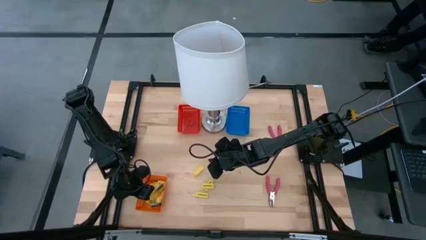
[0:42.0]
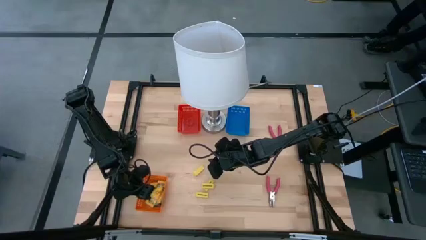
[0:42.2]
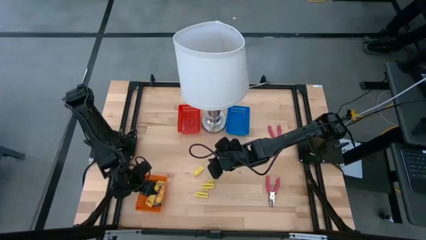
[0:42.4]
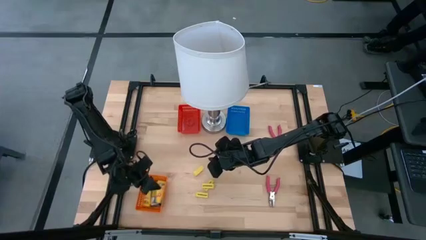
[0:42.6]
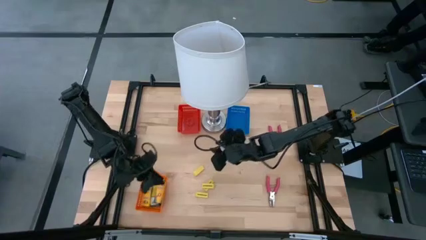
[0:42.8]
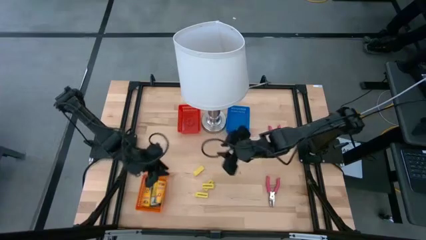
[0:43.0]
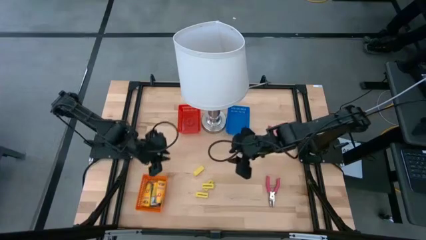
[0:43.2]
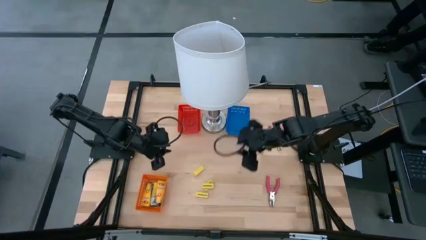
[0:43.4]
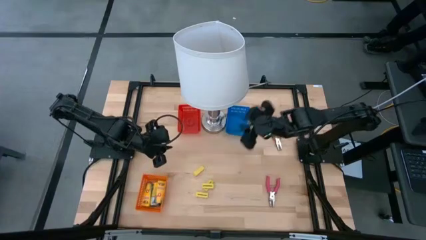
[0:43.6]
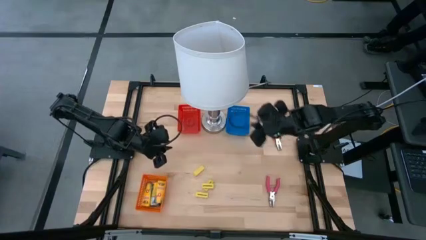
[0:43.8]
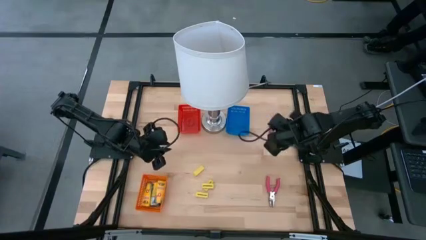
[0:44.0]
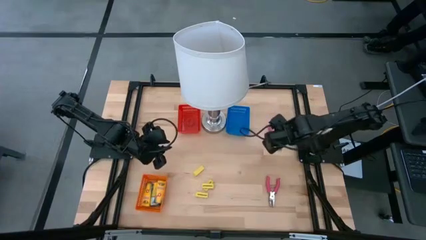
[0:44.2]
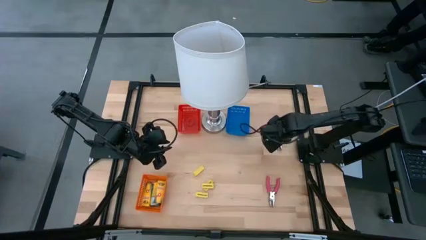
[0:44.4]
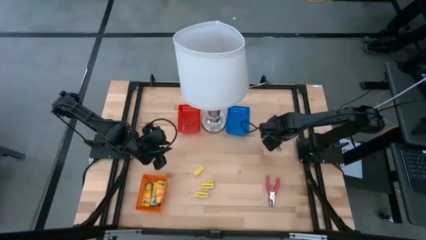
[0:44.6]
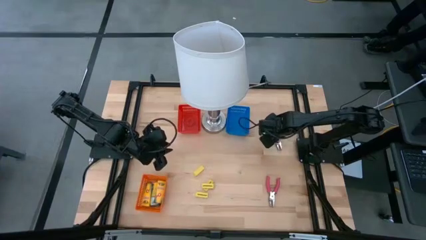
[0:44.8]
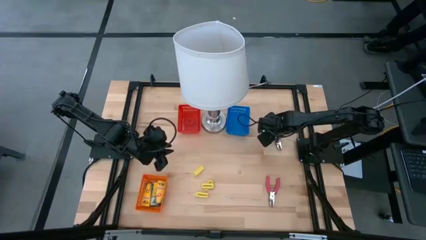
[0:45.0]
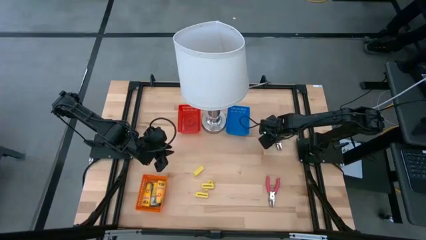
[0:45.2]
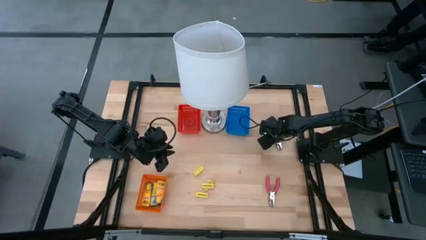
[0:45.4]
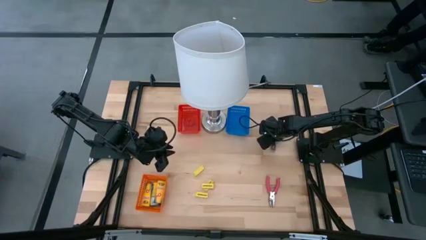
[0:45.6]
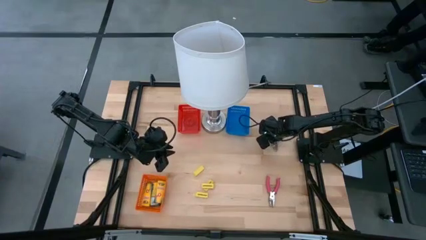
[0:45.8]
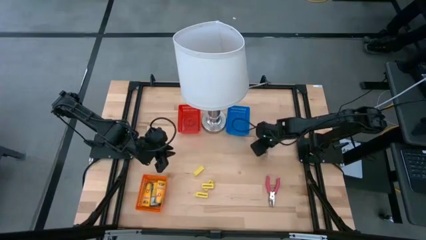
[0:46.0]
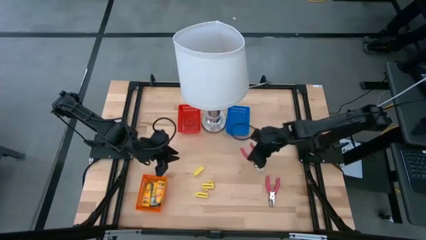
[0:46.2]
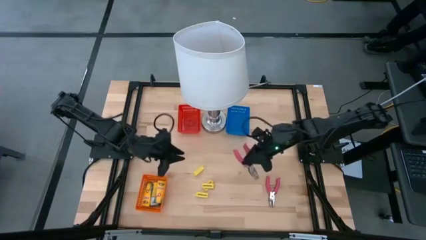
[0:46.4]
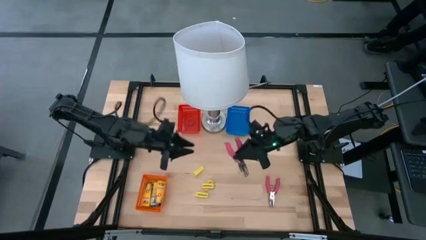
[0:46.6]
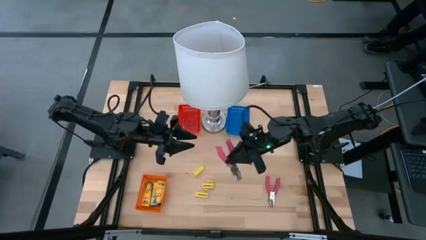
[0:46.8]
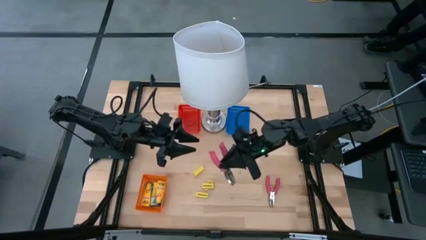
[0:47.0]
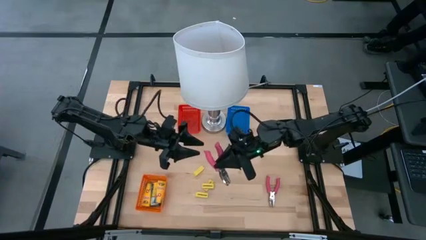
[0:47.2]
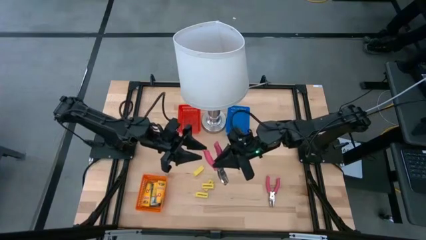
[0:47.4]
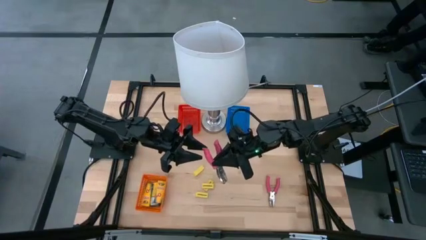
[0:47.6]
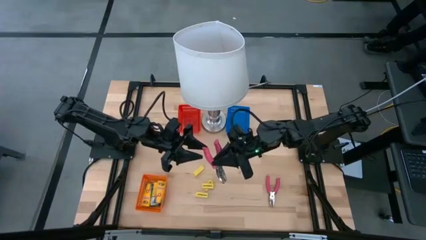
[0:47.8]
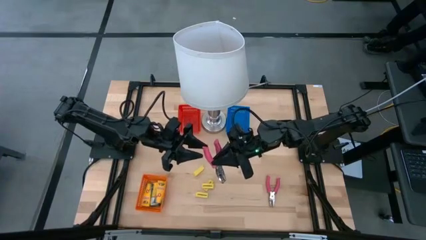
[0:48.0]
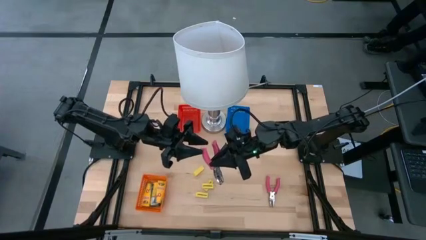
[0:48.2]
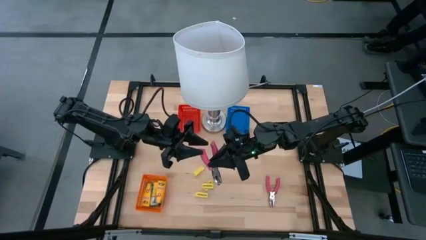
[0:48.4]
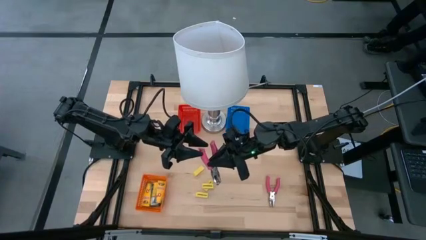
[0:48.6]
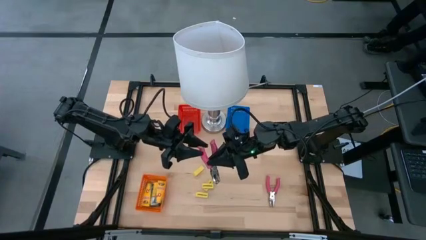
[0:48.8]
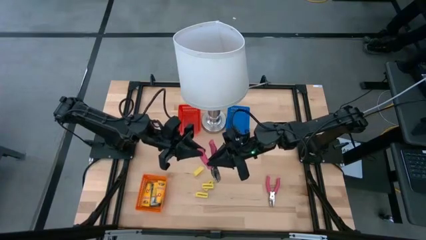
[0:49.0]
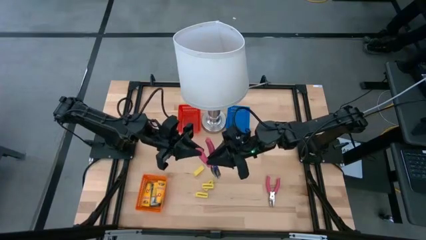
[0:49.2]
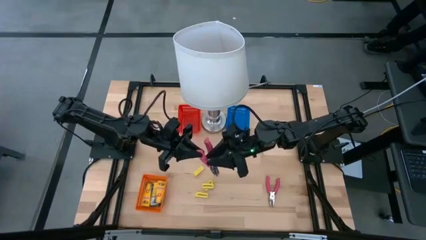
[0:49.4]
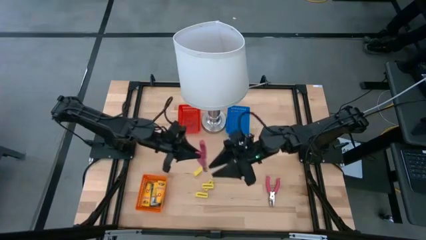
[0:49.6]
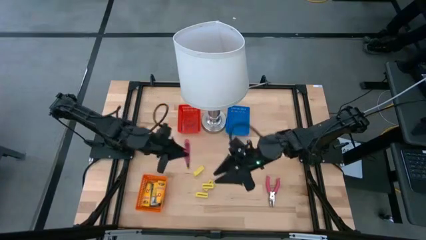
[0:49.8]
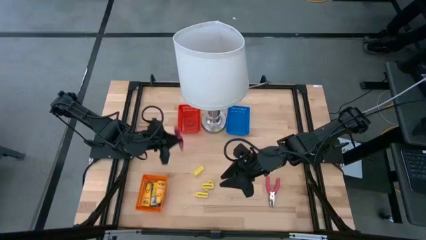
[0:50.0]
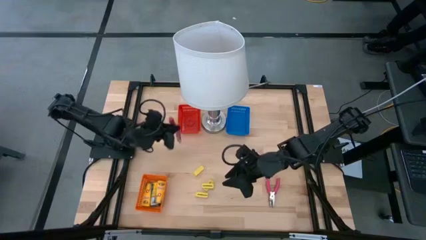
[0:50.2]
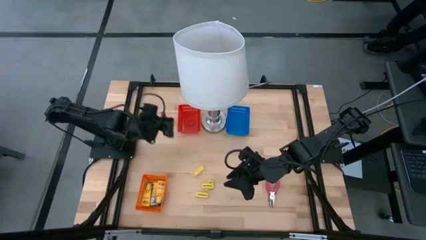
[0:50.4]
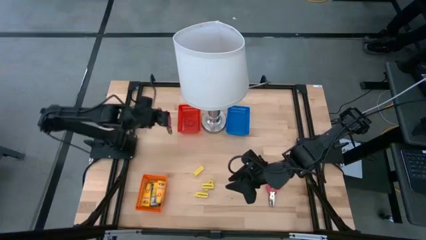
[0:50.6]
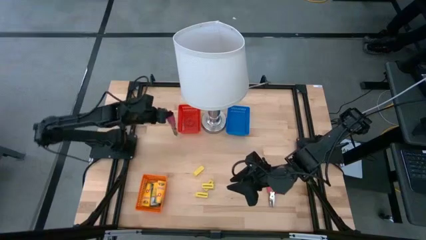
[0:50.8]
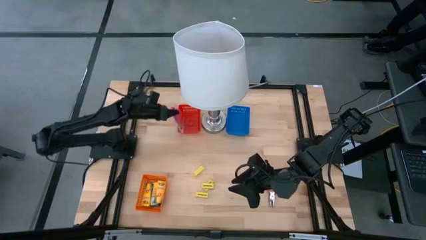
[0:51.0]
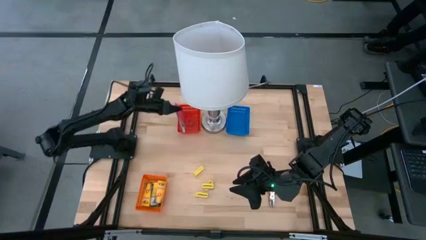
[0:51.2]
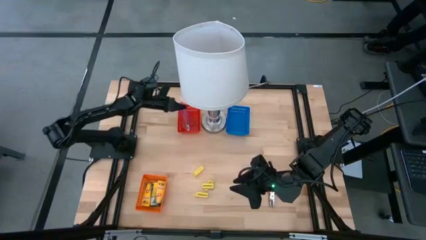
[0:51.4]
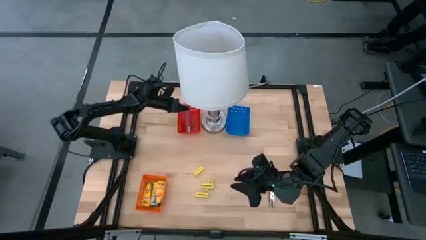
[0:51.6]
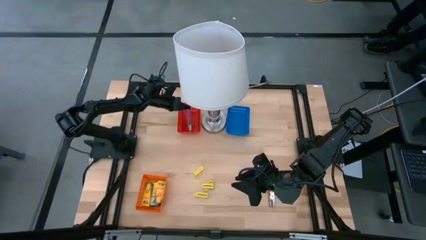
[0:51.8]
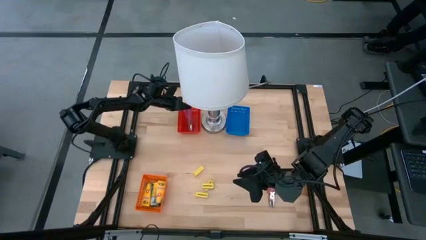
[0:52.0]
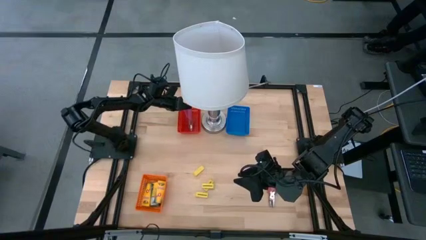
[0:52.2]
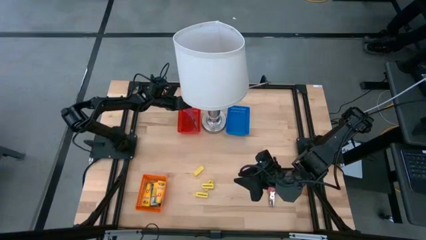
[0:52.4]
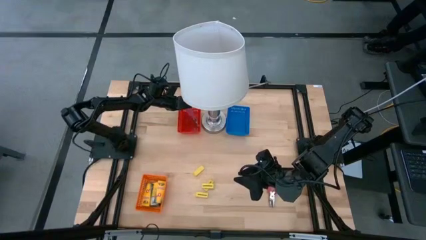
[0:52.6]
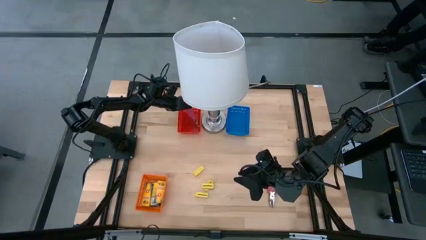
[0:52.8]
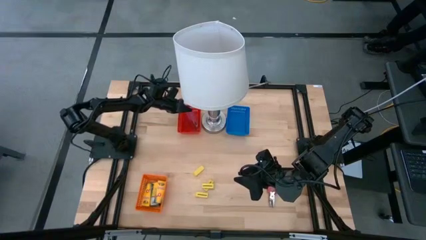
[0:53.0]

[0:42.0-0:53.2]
Task: Pick & Place School Supplies
Put the pink hole puncher into the red basket

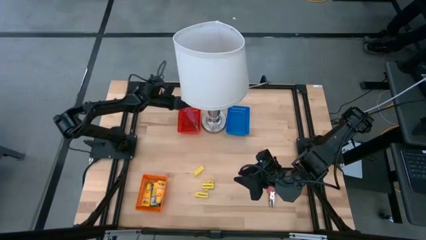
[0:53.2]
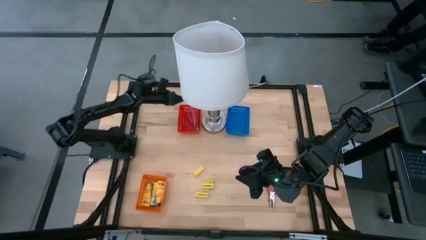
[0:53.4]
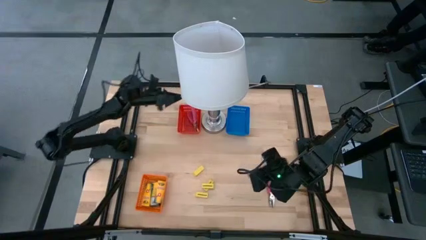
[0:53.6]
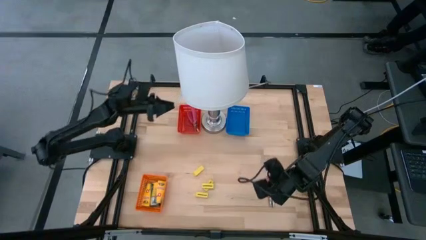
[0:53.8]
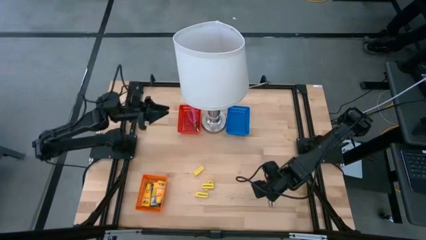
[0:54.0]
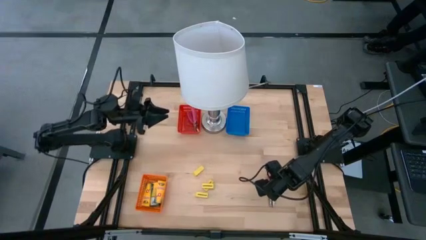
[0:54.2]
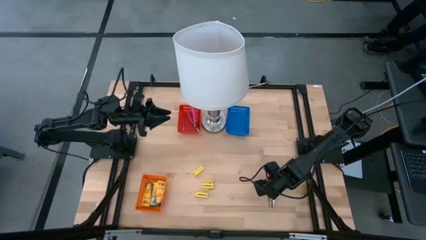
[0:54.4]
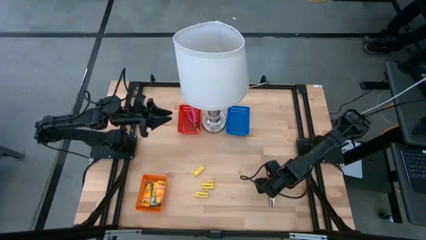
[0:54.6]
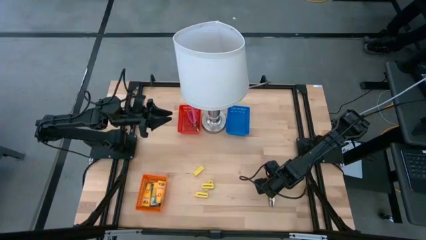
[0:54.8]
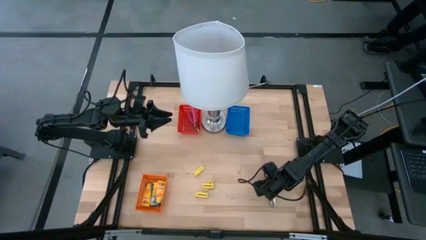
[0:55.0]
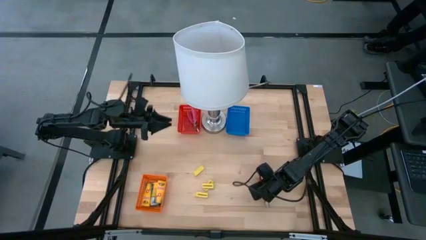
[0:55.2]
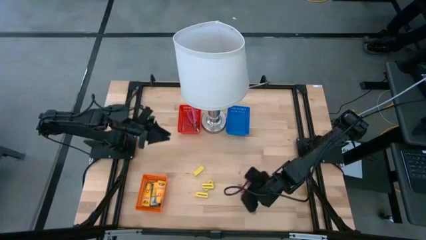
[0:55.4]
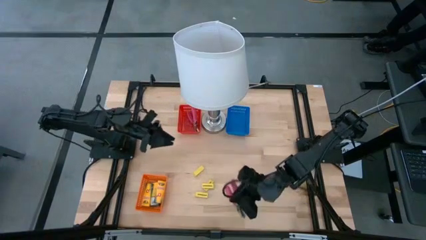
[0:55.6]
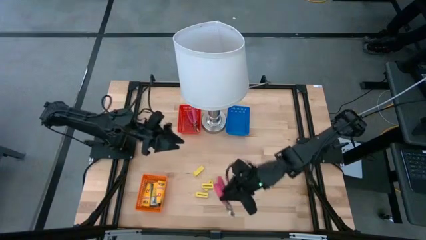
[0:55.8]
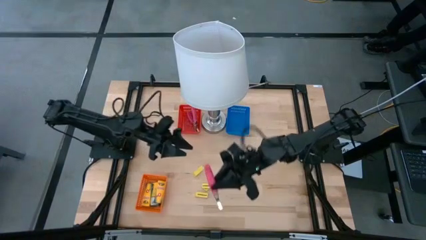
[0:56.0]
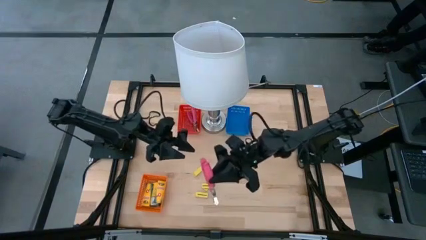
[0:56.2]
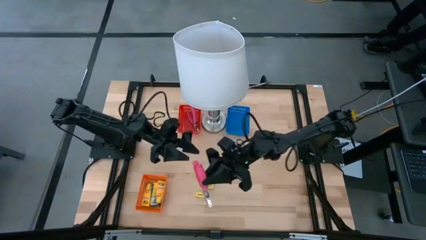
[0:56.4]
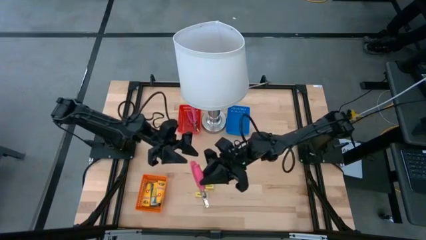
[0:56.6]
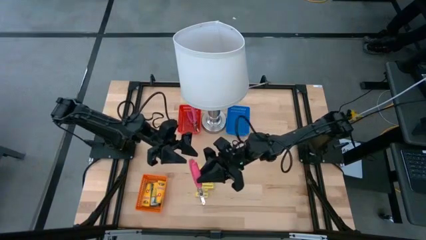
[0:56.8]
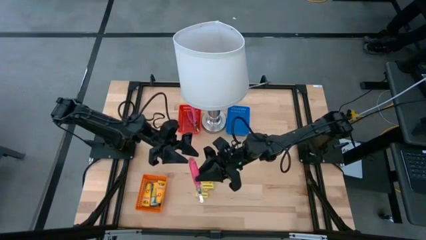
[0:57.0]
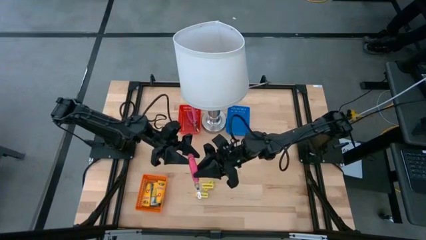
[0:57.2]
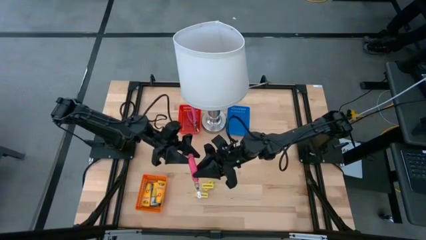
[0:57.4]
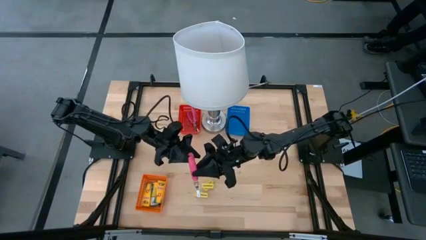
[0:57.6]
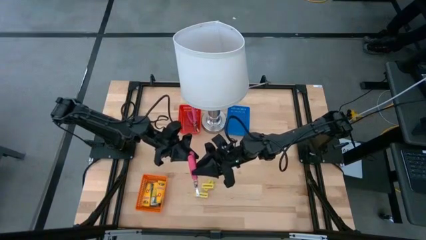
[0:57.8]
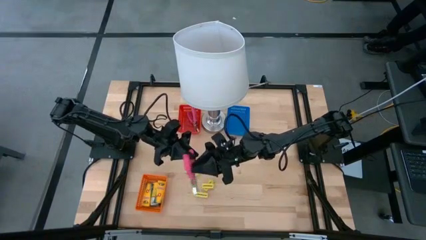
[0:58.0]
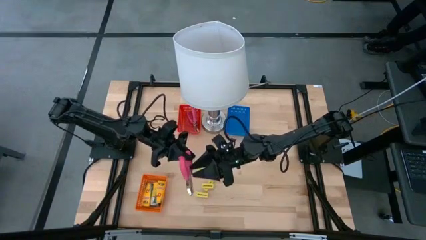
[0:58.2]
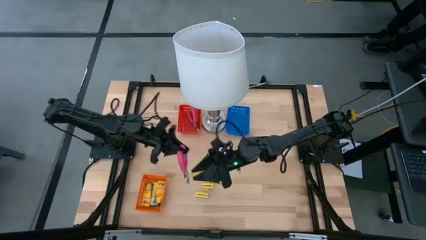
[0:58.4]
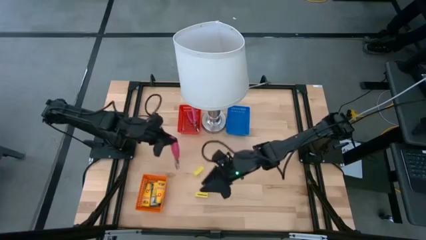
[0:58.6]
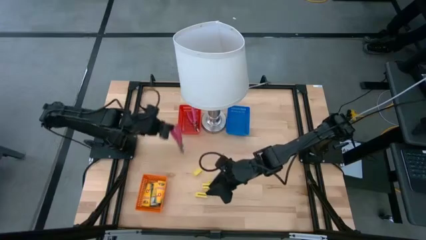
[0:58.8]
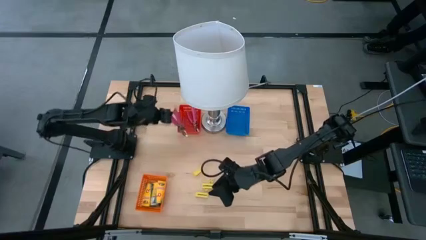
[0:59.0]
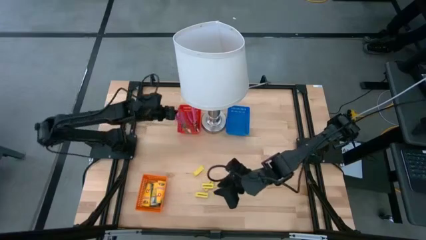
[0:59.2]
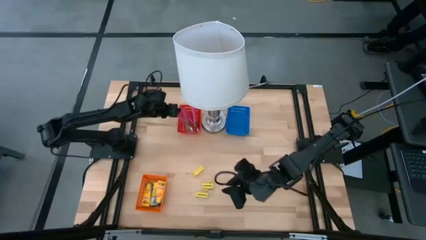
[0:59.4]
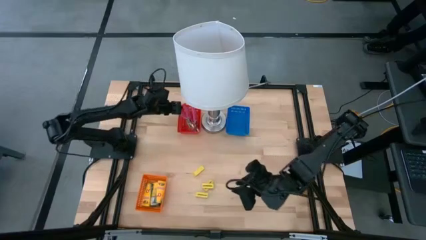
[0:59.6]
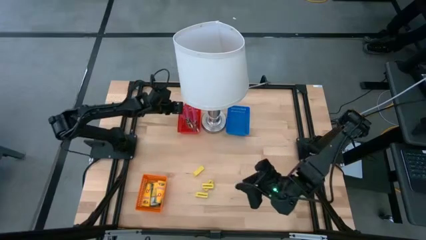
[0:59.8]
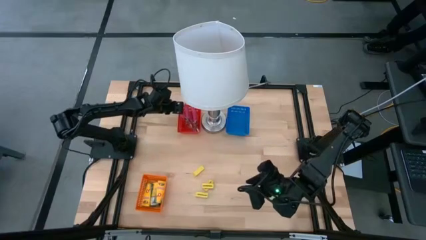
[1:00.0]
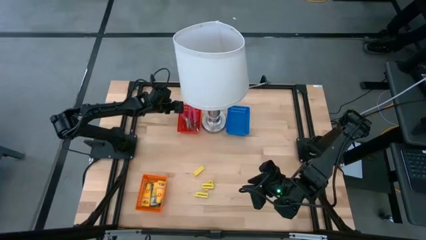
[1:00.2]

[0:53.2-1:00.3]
Put the pink hole puncher into the red basket
